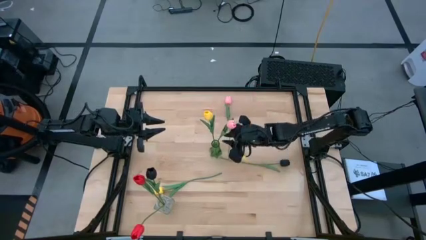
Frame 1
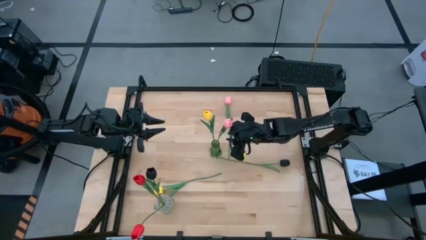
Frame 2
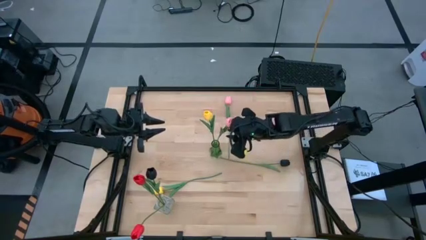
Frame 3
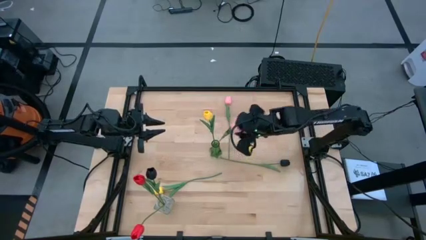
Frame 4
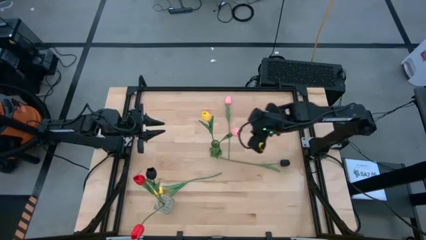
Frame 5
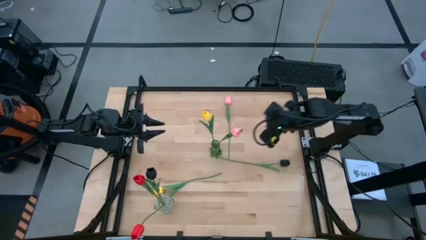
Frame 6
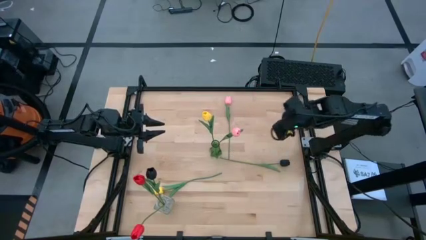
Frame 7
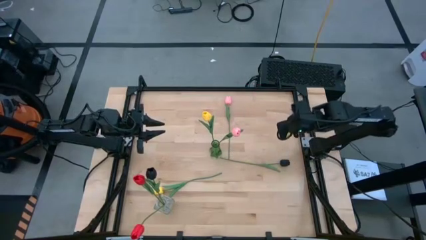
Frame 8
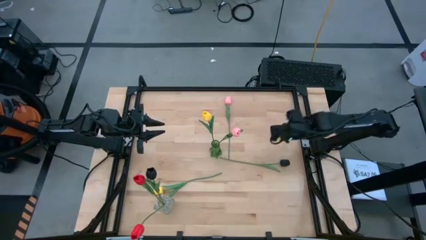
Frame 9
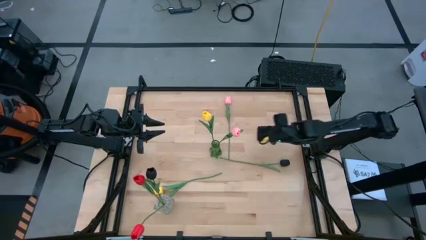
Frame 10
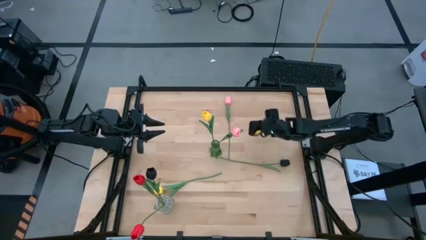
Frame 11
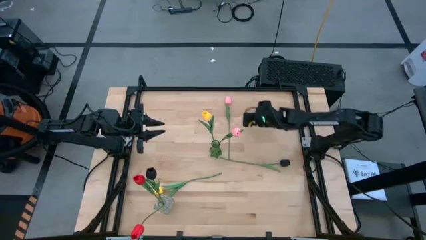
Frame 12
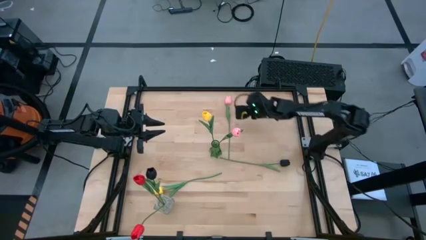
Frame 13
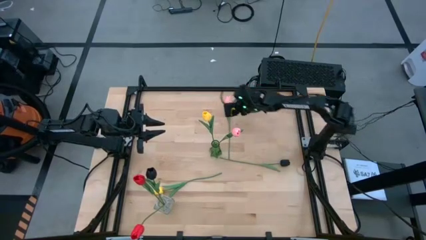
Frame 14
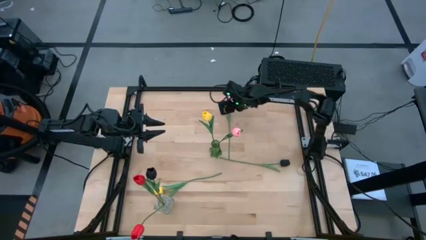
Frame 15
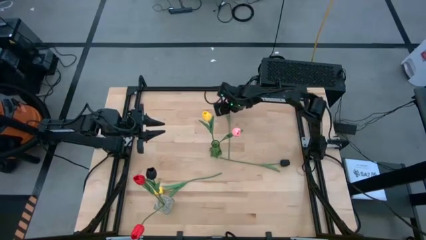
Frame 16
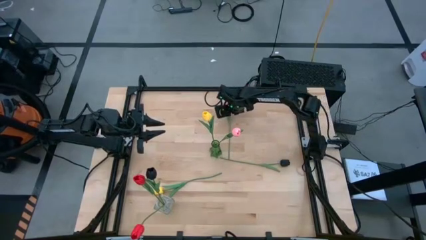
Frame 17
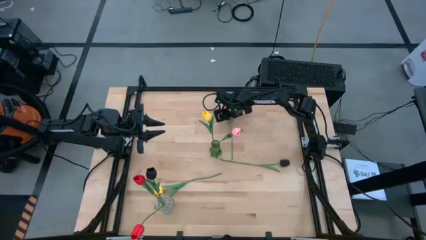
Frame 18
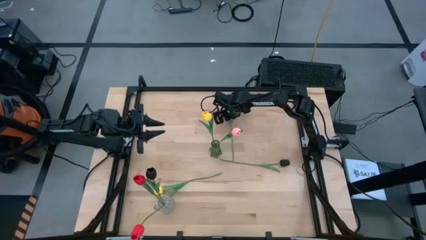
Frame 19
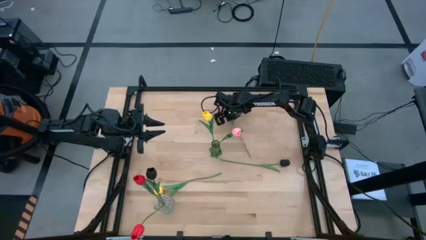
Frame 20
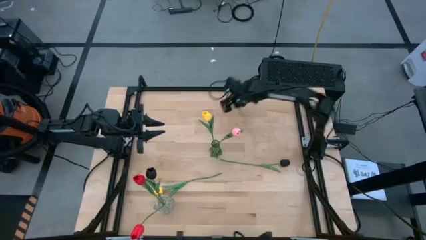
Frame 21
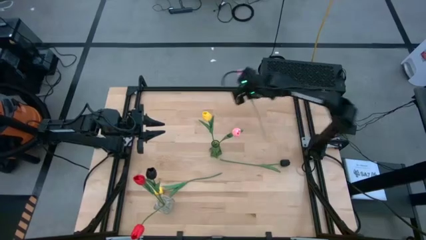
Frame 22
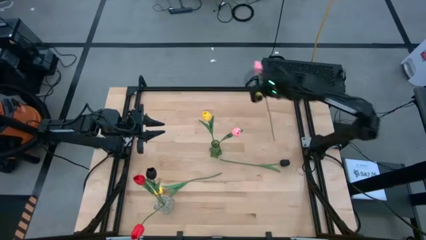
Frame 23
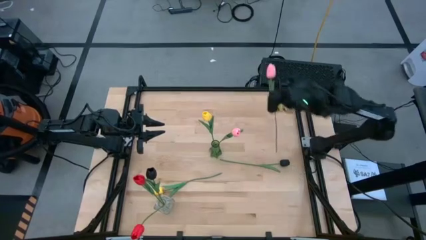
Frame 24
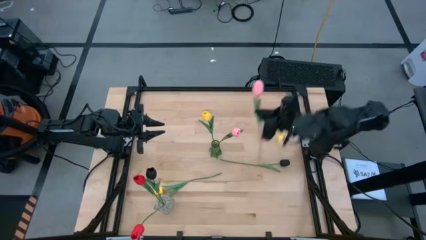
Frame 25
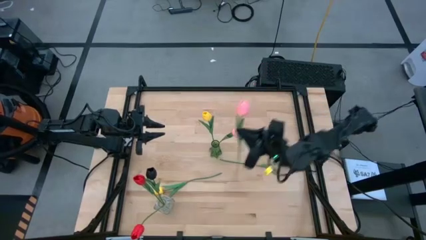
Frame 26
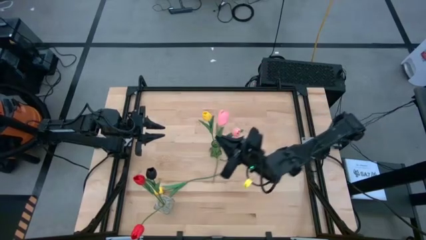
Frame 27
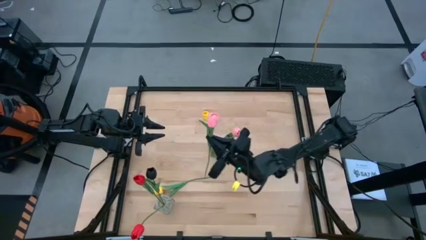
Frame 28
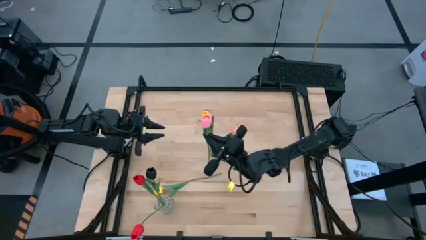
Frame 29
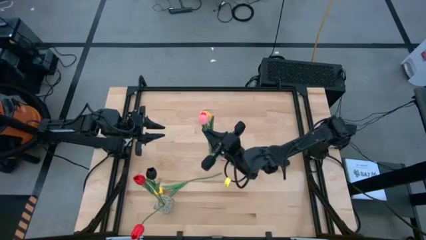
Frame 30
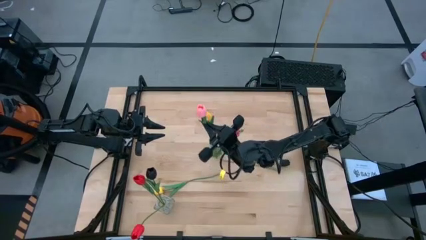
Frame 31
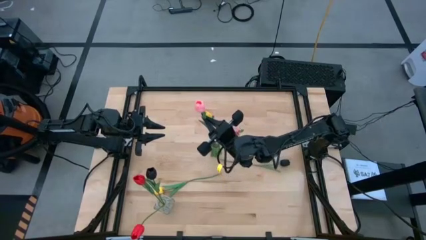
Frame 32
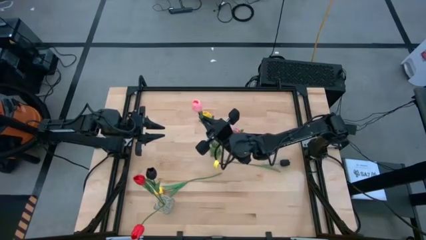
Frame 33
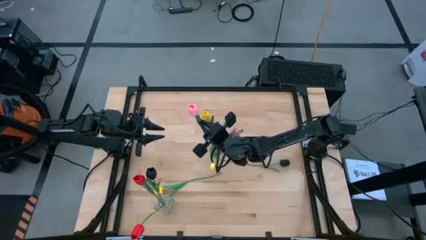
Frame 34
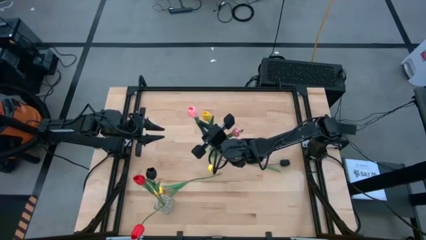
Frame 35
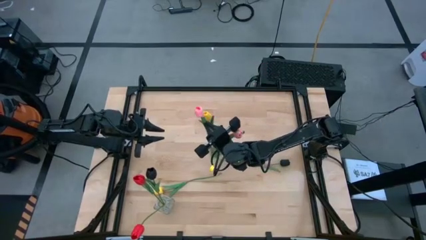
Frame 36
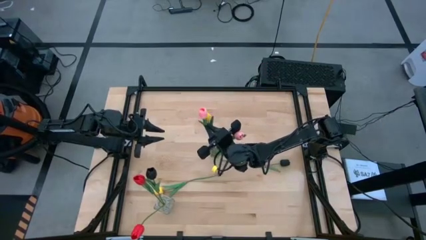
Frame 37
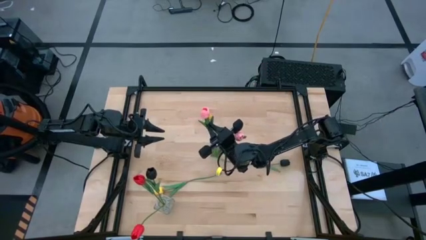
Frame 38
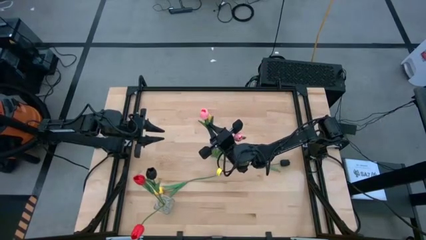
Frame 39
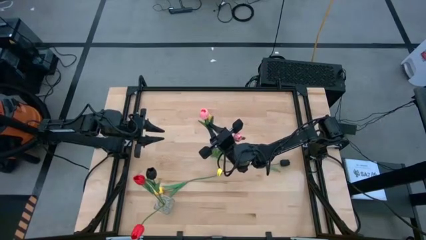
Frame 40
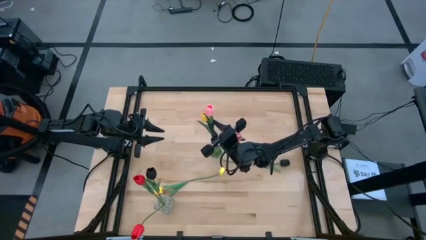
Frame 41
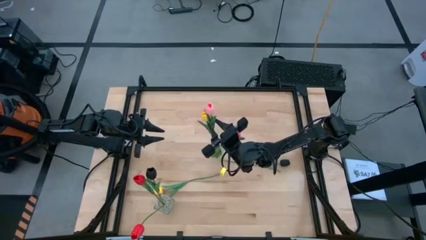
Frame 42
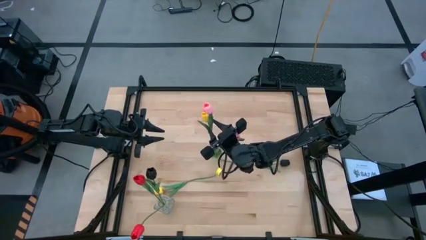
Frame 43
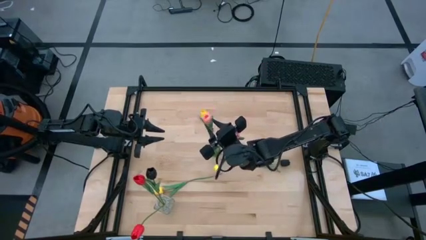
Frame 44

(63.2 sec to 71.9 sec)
Task: Sort flowers into vase by color
Put the pink tulip into the green vase

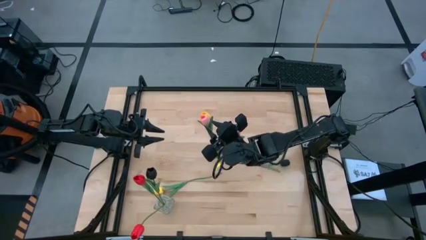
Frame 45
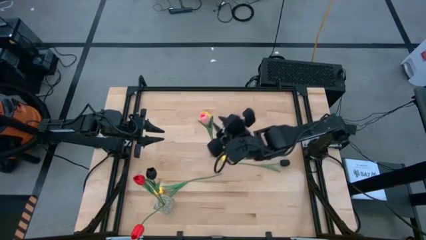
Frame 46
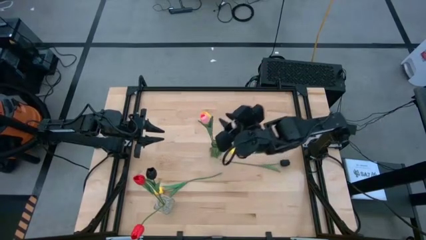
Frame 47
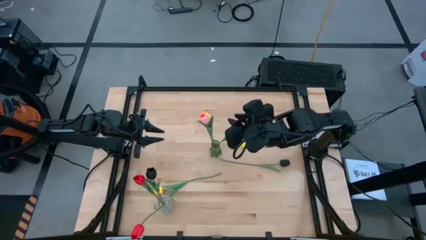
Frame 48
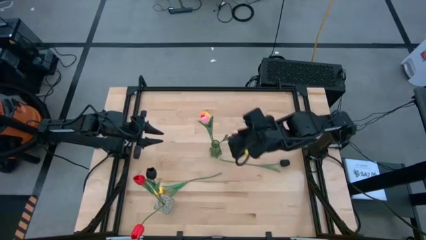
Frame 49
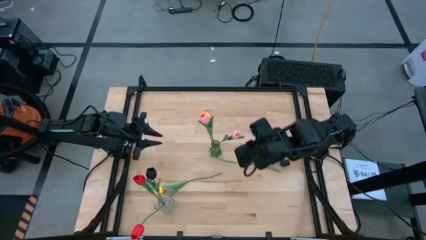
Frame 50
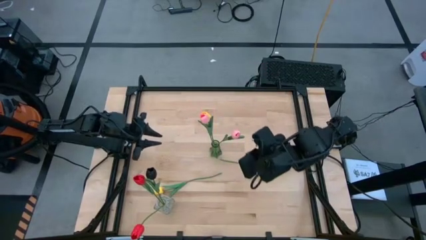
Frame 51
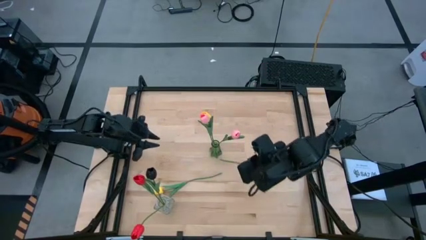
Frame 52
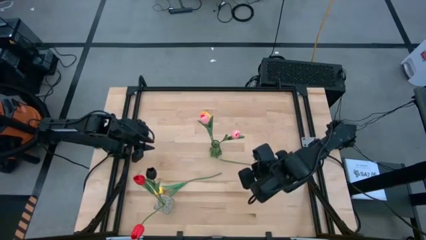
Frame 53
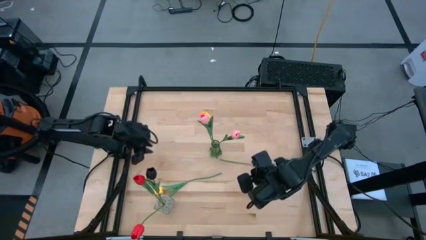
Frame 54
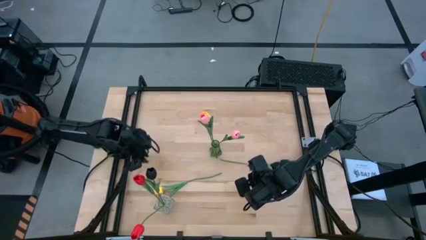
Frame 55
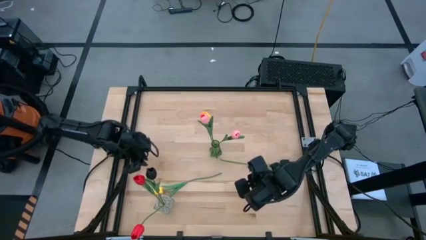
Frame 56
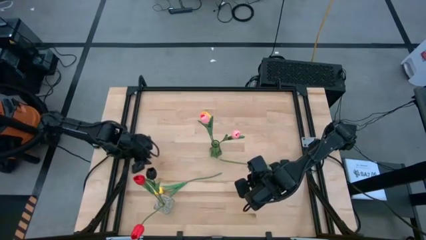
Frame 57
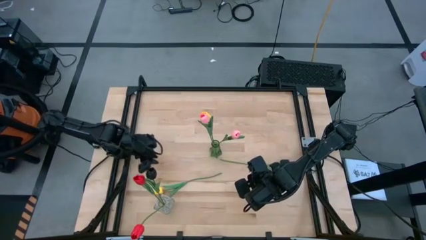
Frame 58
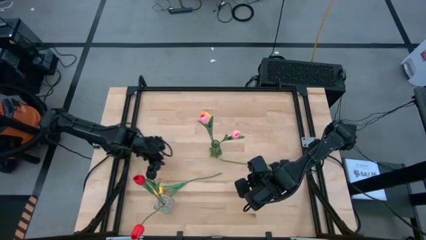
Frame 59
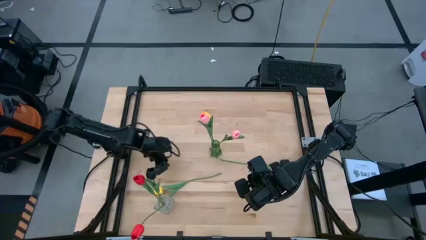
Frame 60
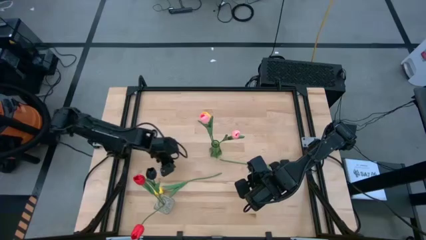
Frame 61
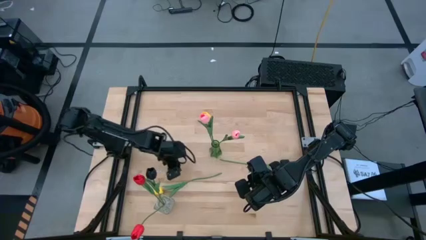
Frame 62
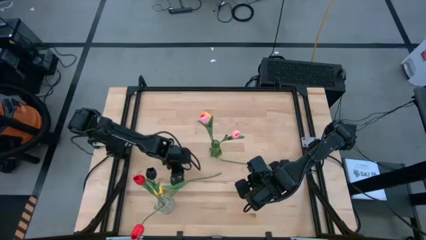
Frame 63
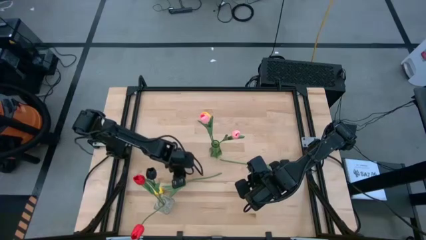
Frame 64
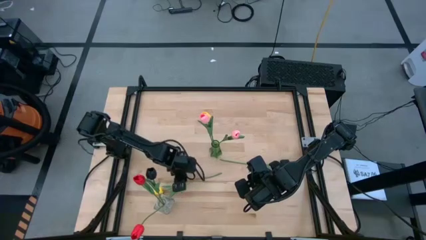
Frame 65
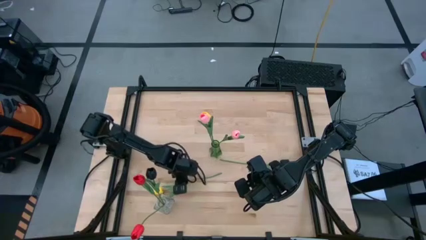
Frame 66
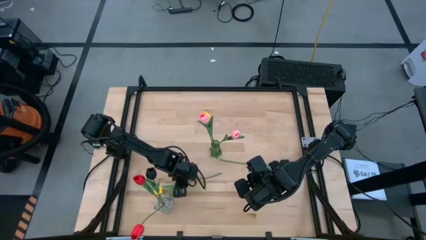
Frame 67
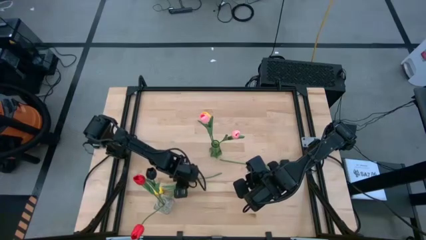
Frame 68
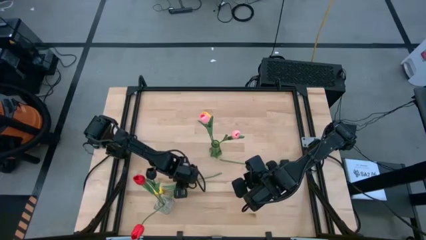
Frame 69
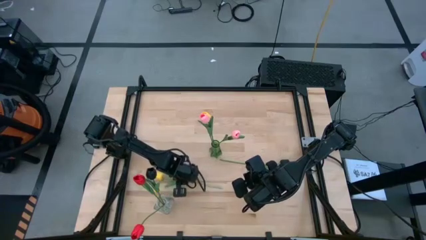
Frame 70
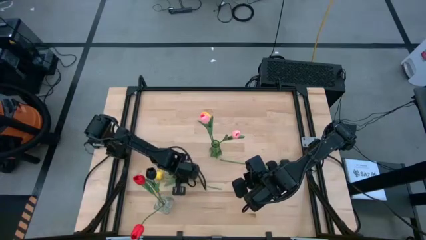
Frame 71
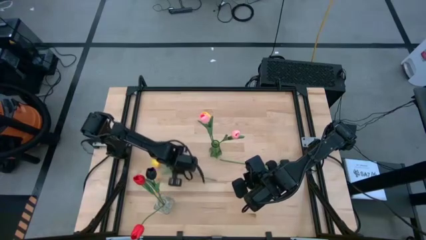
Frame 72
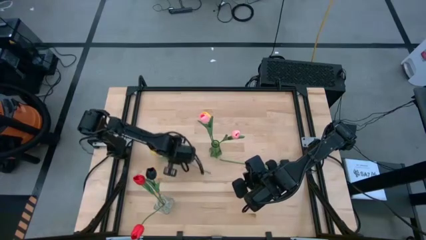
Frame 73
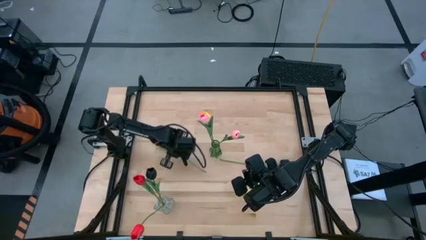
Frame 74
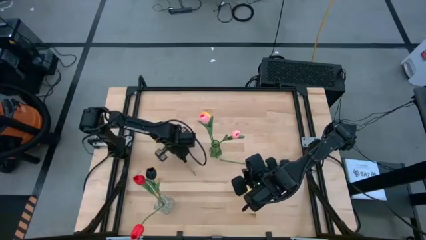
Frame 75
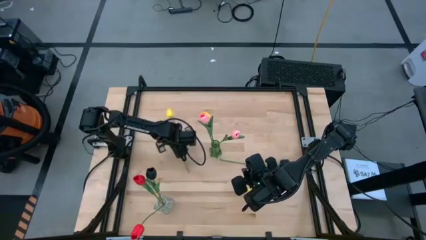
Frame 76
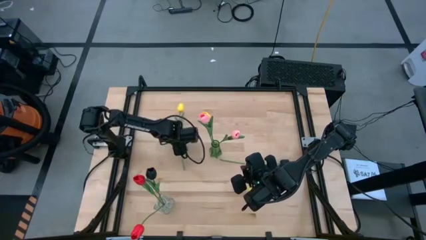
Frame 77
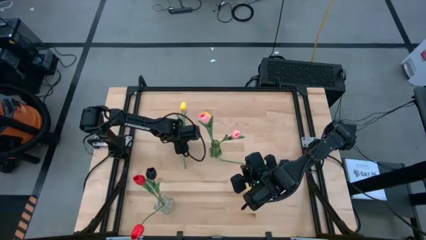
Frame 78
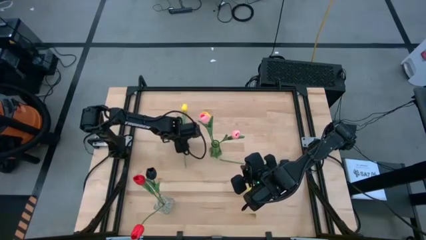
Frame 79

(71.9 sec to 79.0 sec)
Put the yellow tulip into the green vase

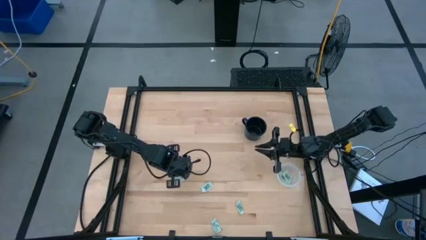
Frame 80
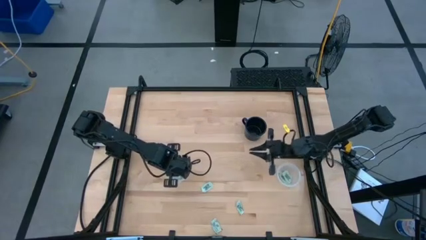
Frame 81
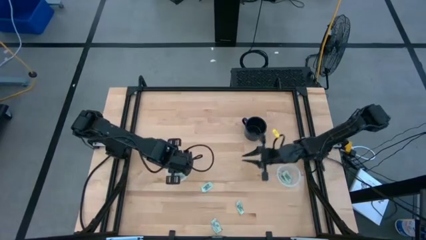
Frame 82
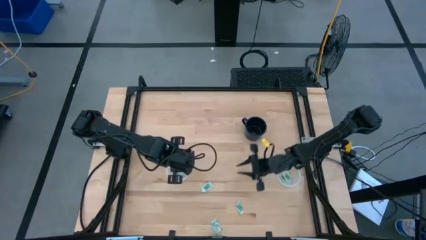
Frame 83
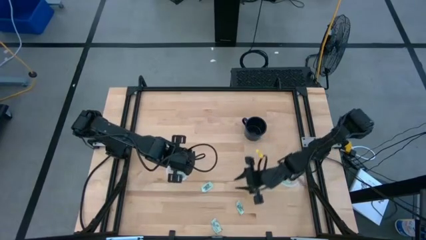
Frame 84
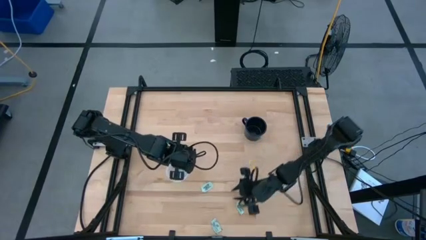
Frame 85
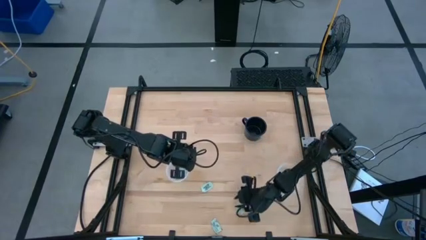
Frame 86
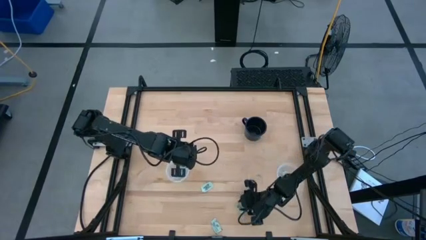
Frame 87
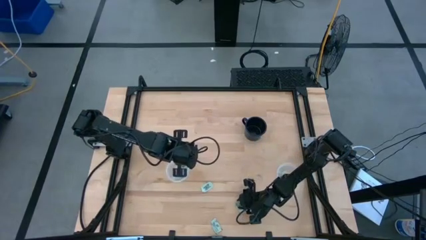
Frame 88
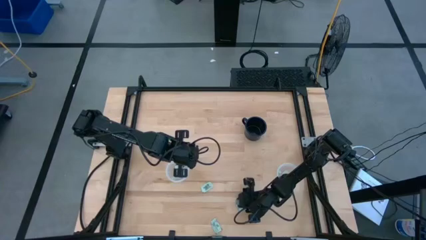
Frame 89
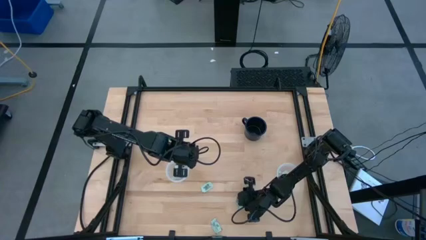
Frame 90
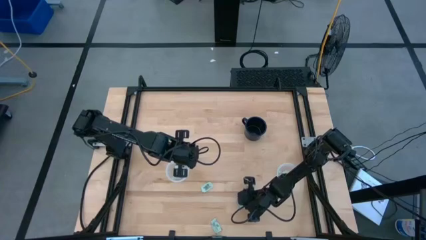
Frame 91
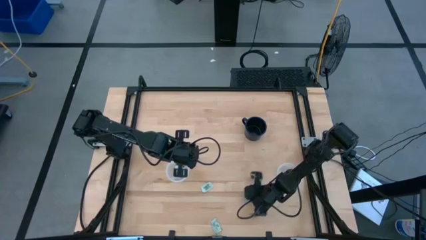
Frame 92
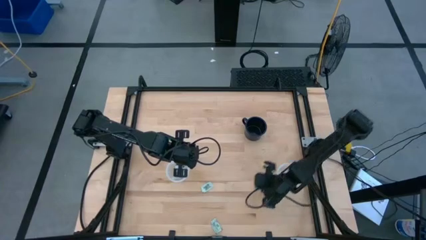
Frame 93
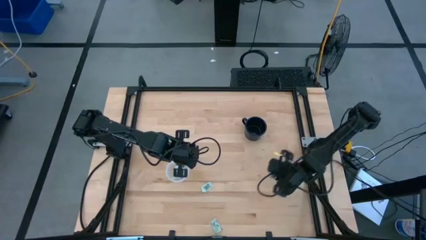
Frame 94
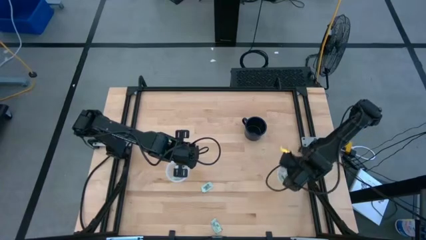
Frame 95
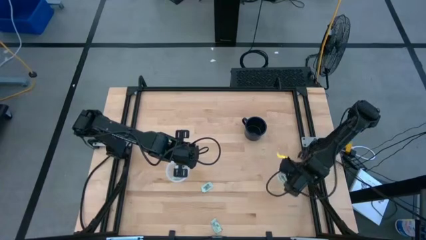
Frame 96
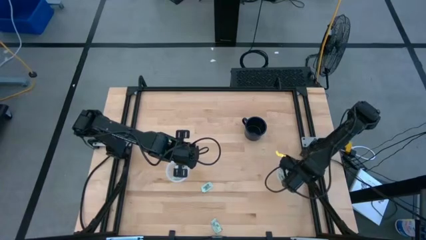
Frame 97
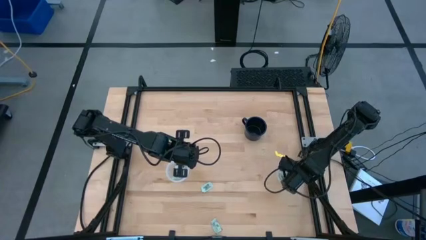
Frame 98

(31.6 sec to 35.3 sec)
Task: Pick and place Stevia / Truvia into bins
Put the stevia packet into the right transparent plastic container
